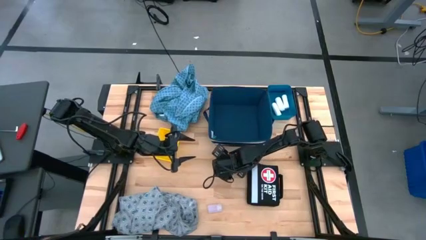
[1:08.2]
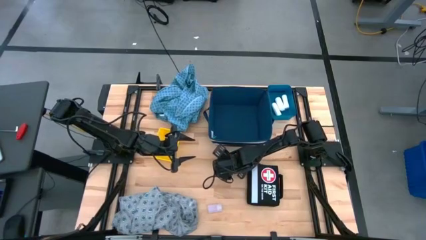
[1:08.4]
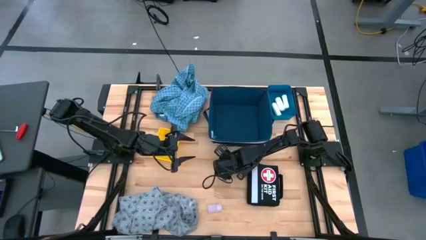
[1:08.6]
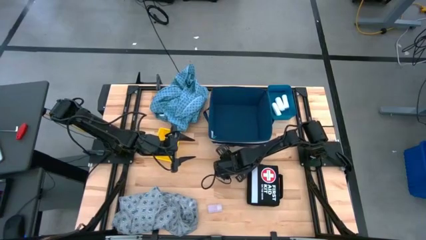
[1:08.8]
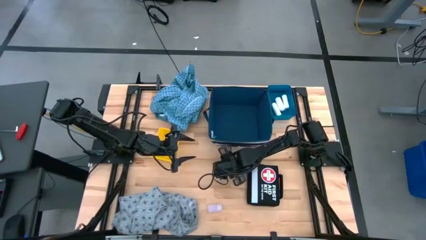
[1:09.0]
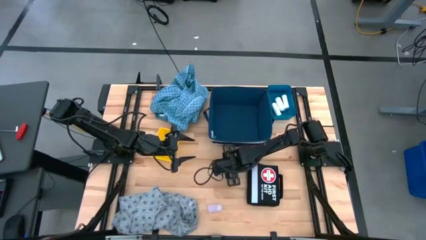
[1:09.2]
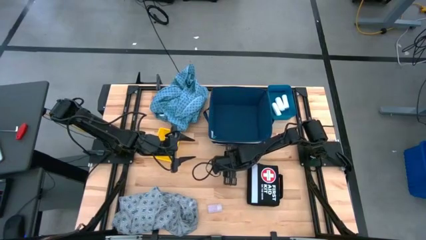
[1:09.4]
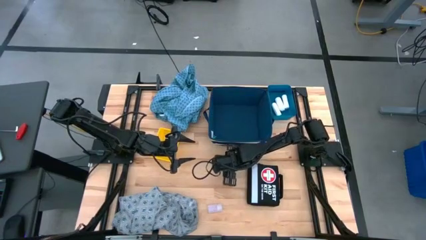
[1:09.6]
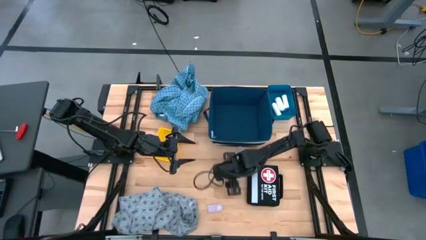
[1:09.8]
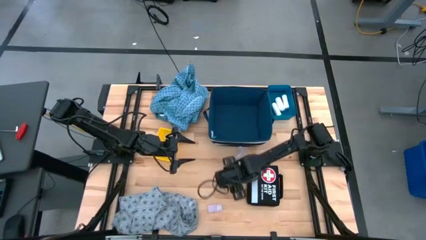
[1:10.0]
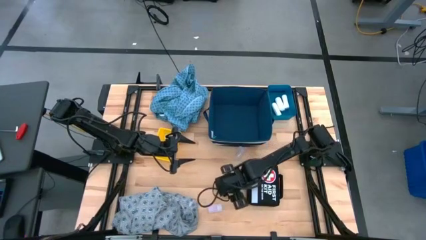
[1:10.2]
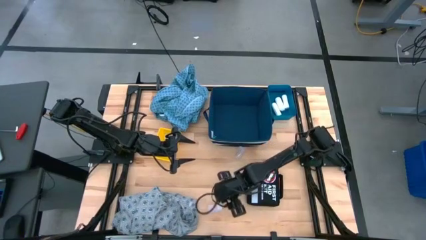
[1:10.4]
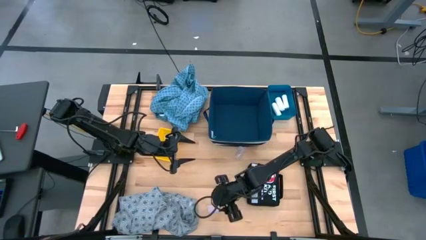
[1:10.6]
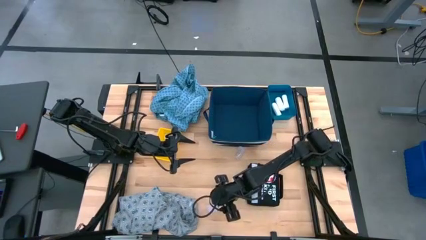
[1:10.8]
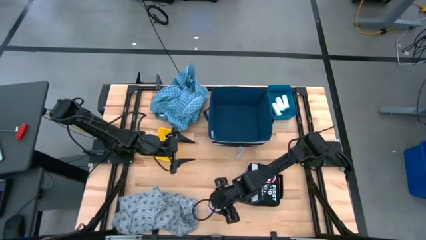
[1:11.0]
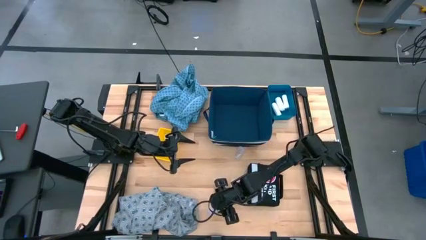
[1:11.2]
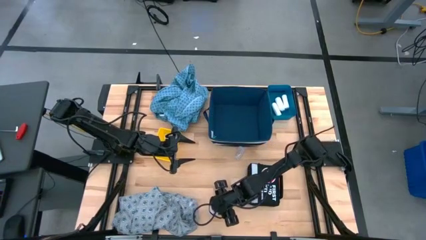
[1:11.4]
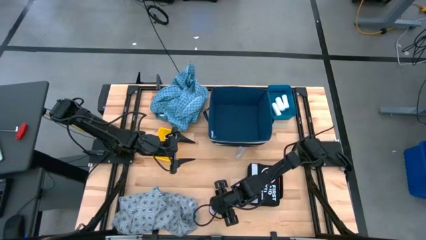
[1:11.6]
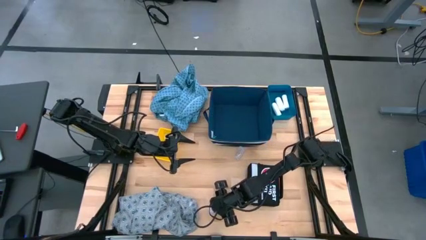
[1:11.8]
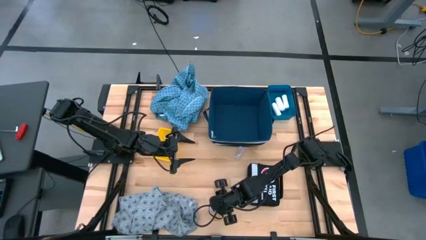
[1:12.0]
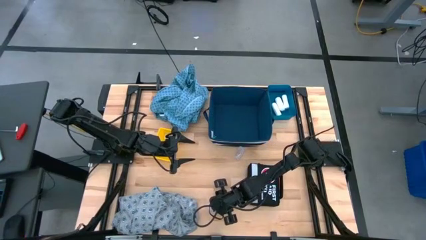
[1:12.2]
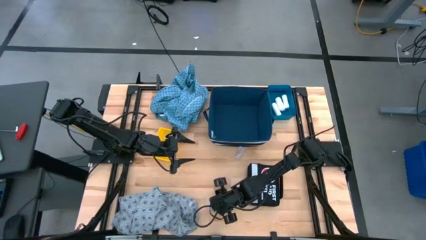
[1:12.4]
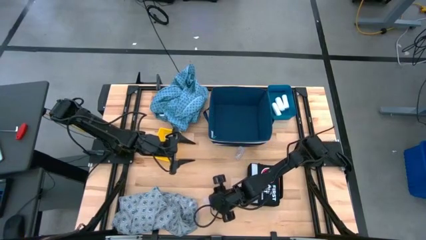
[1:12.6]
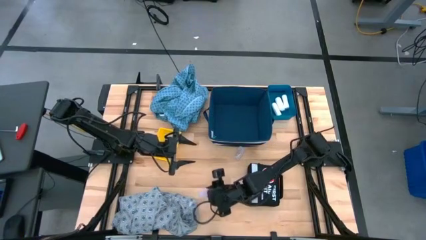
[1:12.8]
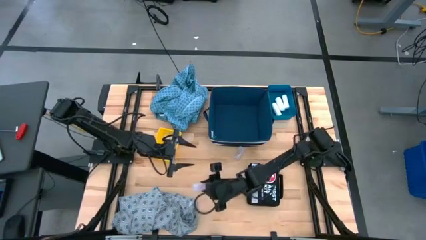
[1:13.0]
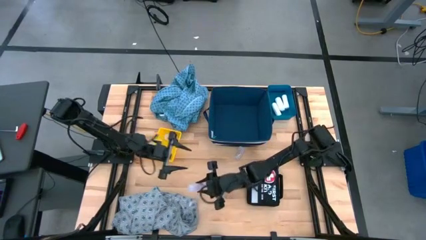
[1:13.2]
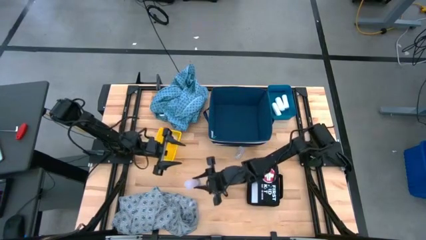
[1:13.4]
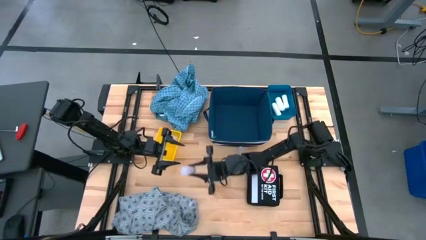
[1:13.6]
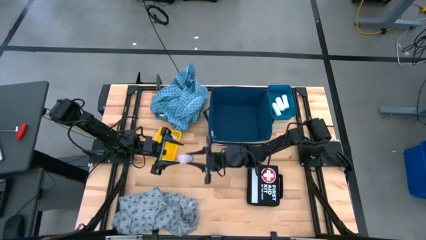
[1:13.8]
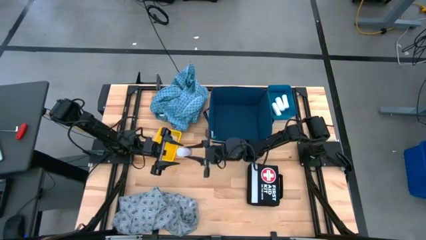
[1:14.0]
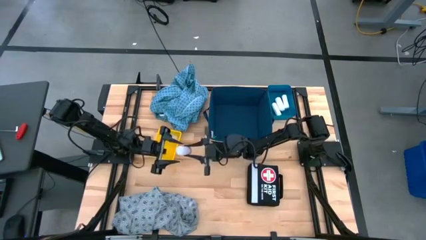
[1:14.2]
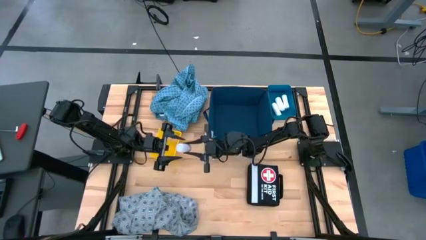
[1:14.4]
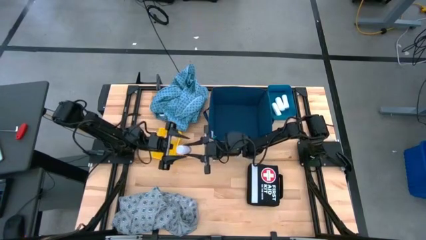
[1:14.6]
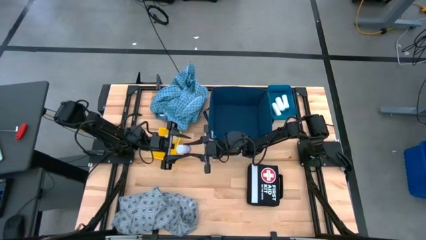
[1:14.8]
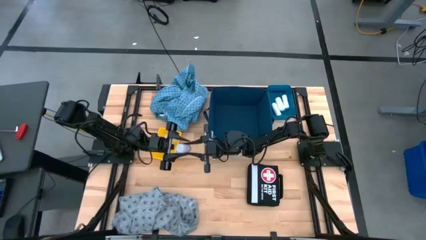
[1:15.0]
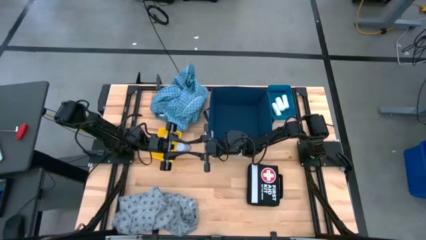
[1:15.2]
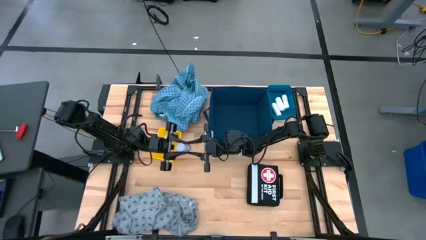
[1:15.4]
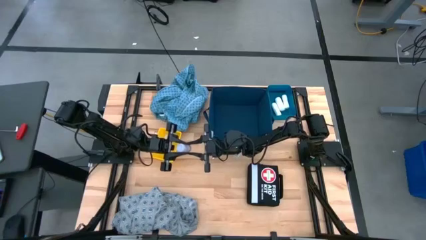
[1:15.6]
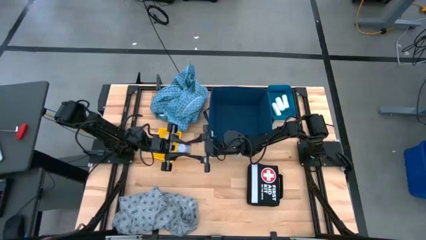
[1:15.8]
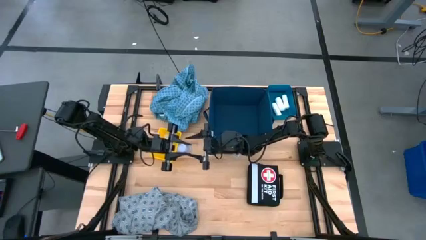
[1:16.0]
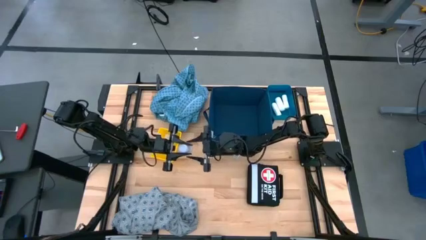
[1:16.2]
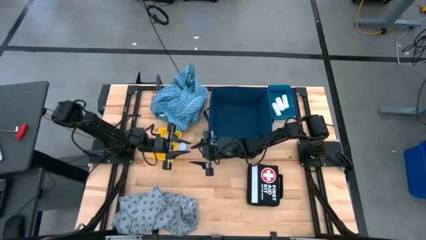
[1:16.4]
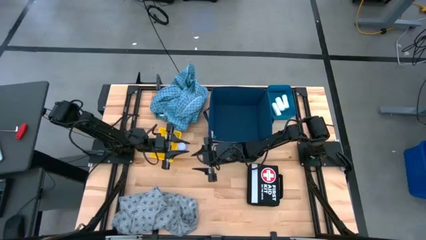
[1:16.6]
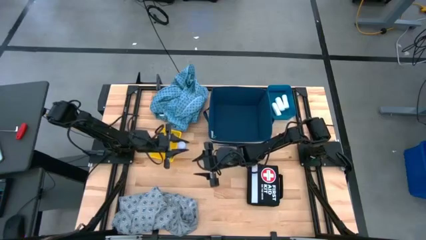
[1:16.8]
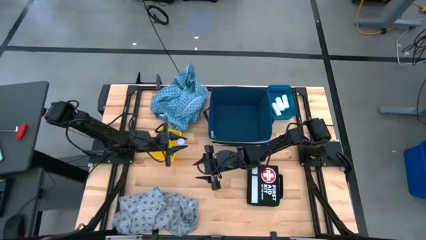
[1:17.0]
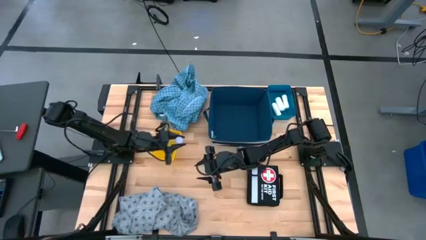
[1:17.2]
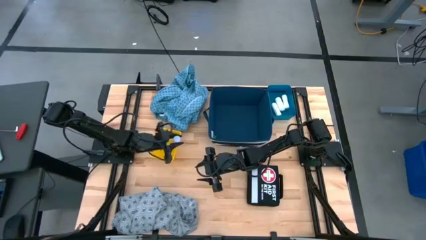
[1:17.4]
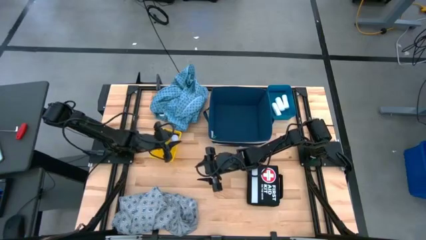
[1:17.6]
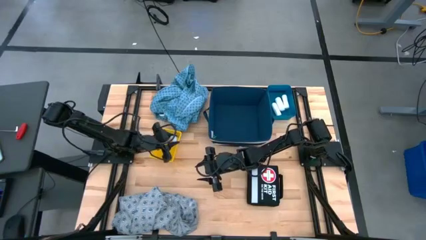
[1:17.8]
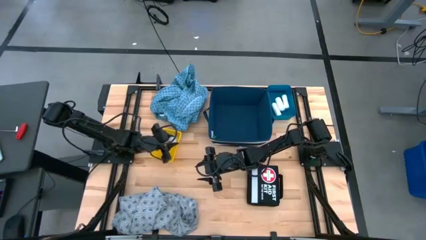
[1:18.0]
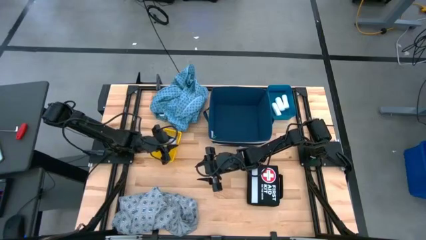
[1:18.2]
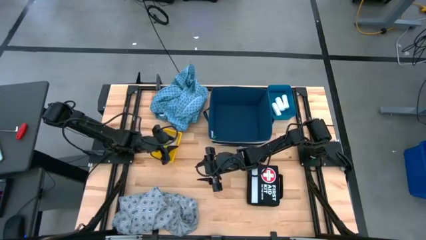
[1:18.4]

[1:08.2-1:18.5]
Task: Pick & place medical supplies in basket/bin
Put the bottom transparent pill bottle into the yellow bin

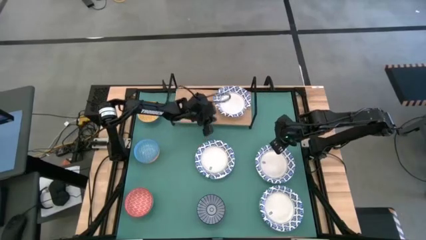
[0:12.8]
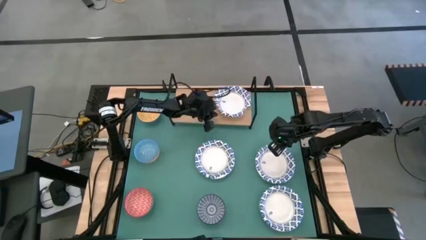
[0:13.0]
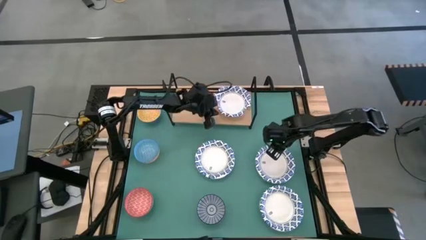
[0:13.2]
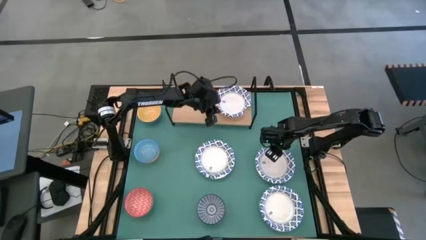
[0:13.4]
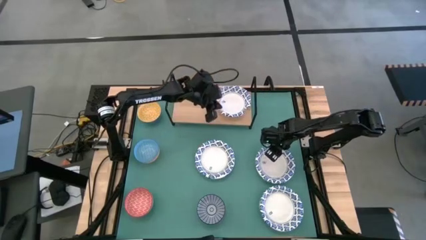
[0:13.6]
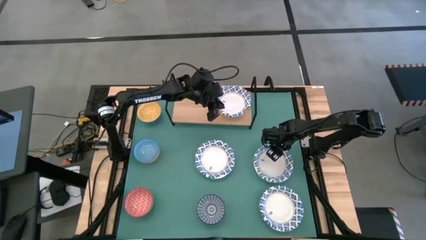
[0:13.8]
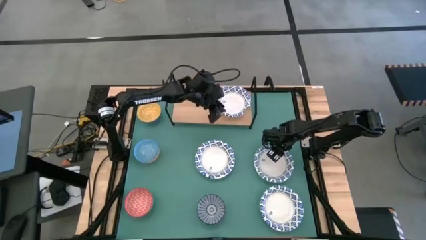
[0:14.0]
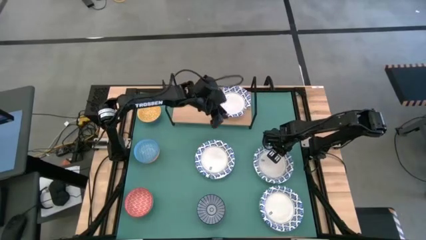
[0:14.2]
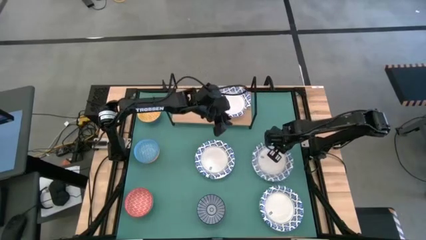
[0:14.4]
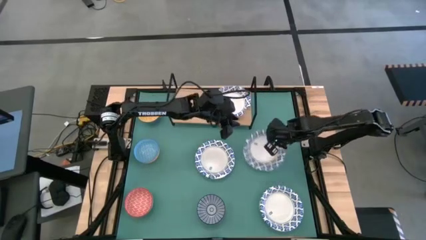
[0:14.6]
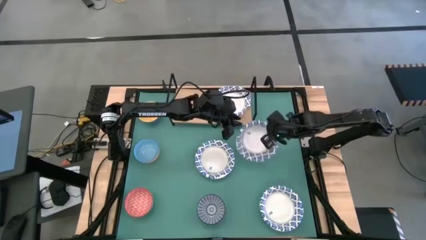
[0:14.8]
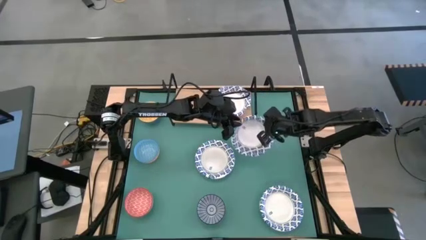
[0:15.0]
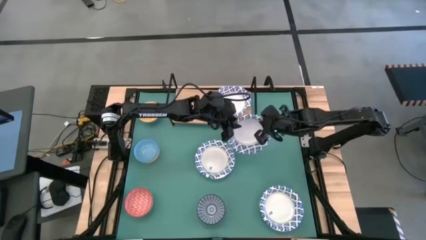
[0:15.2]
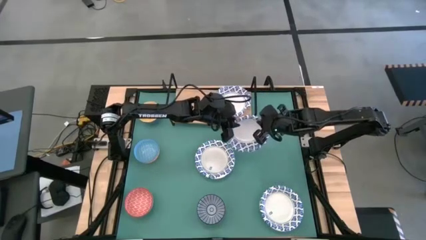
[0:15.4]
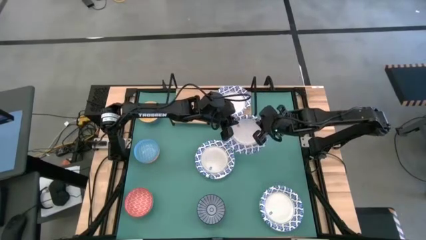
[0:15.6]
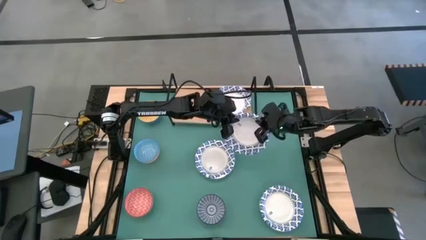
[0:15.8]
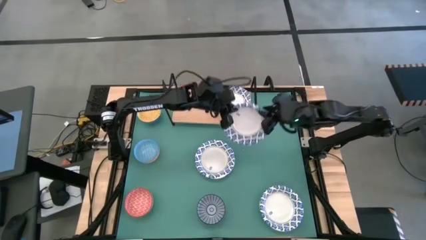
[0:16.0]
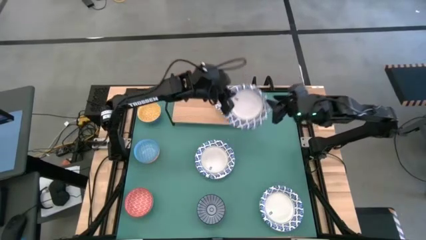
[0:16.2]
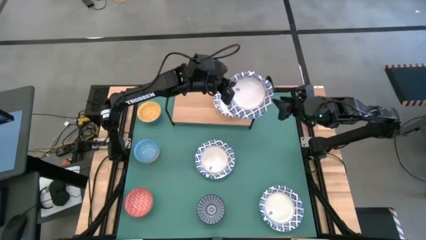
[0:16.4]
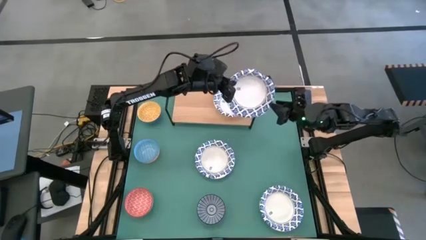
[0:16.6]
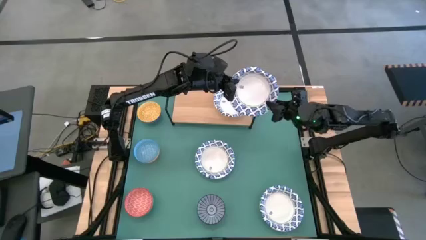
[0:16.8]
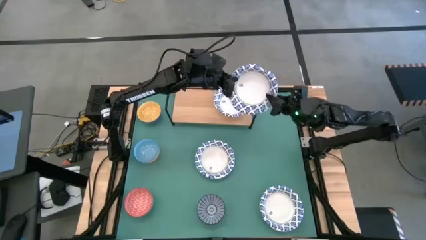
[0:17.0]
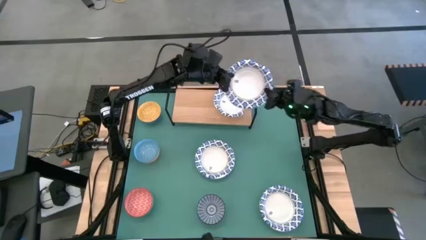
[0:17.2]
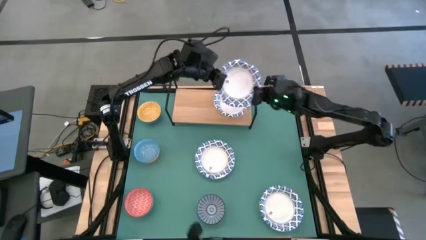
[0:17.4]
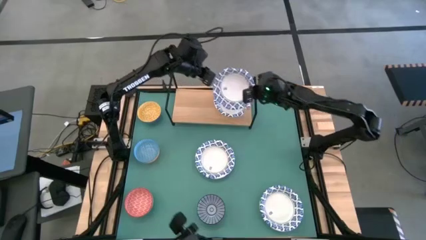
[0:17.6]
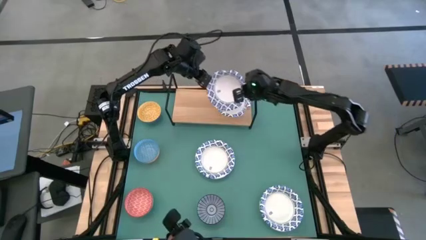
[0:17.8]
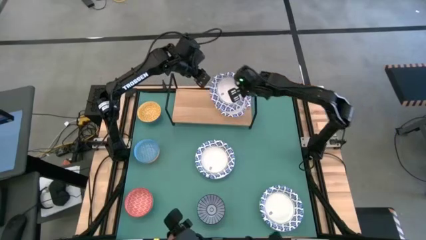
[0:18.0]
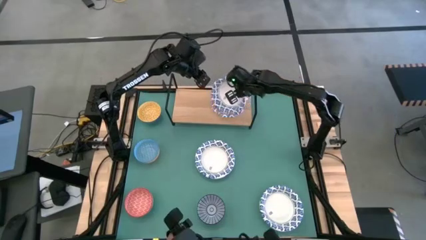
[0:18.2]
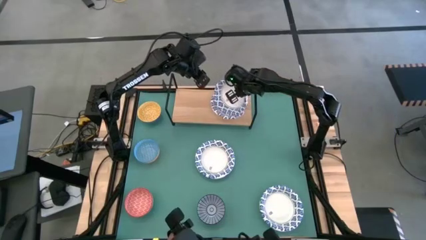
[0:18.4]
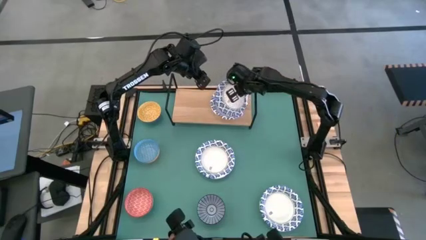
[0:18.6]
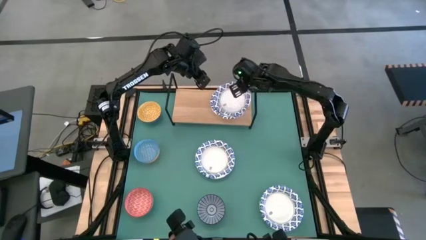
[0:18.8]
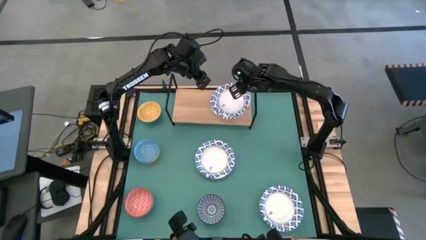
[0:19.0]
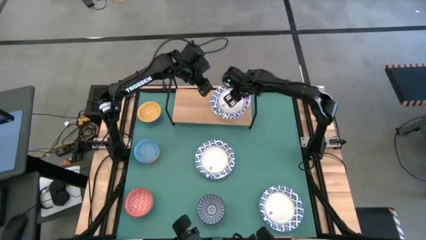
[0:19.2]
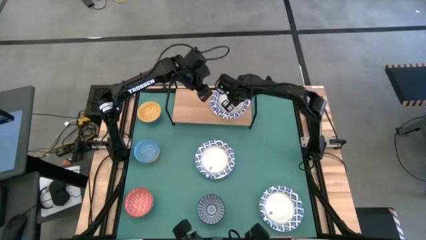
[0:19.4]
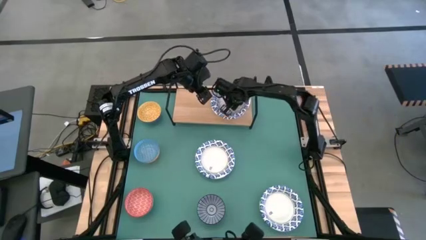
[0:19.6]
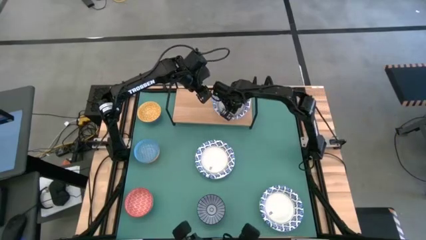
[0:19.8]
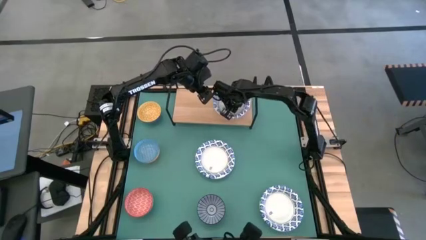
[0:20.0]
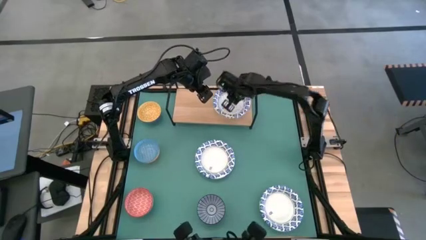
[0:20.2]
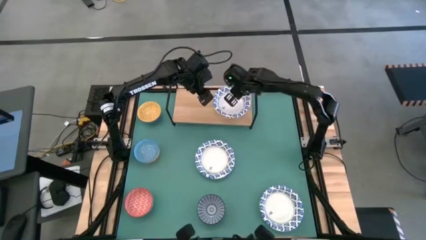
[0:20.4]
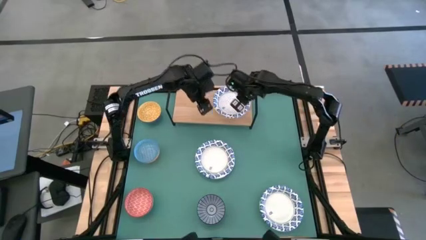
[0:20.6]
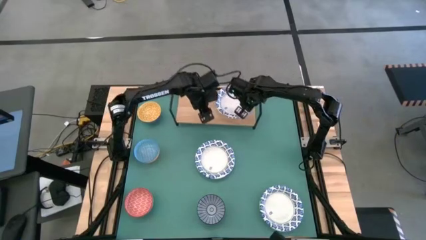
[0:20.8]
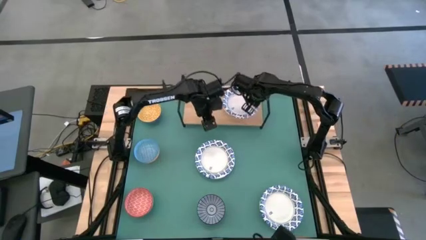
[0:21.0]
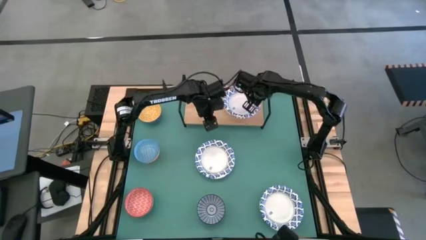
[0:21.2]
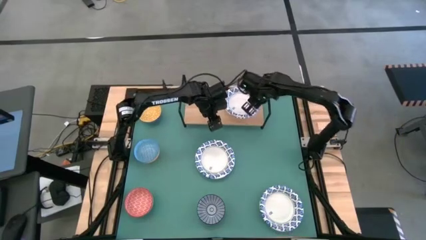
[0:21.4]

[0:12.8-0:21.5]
Task: Place and stack bowls onto a shelf
Stack the top right blue and white bowl on the blue and white bowl on the shelf
